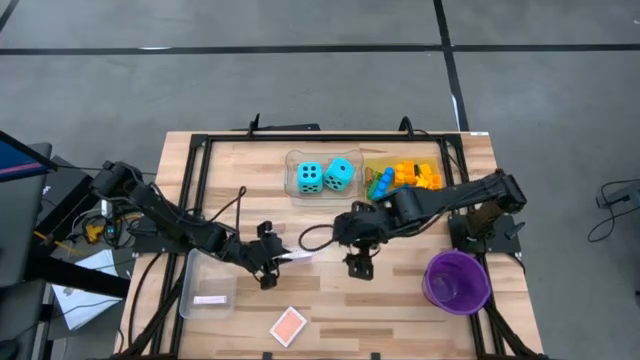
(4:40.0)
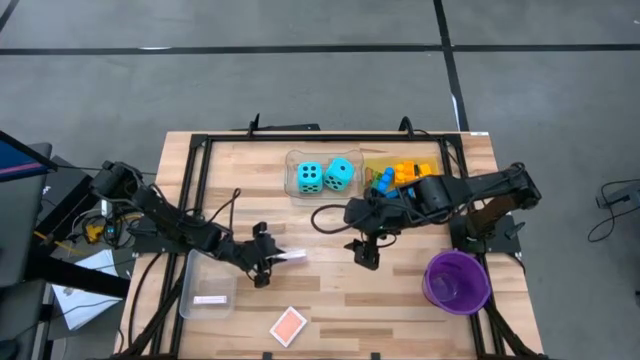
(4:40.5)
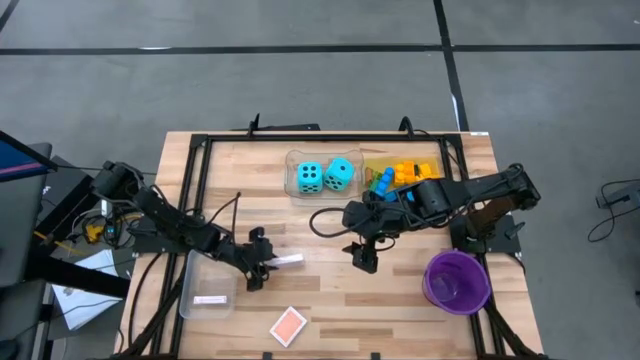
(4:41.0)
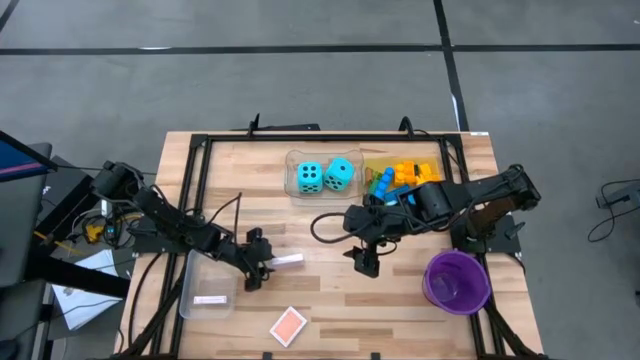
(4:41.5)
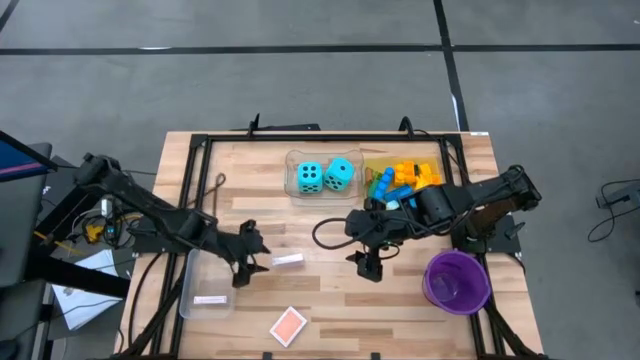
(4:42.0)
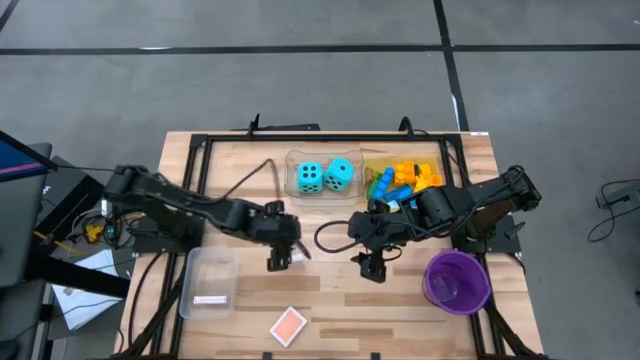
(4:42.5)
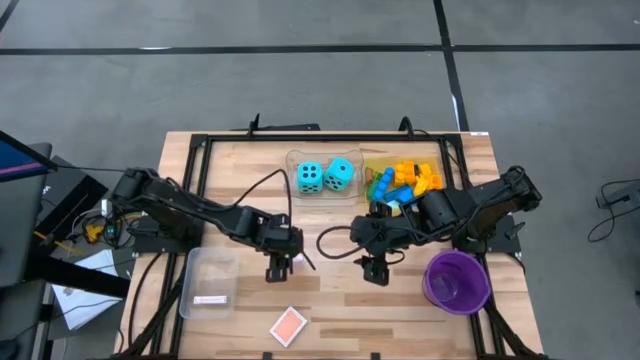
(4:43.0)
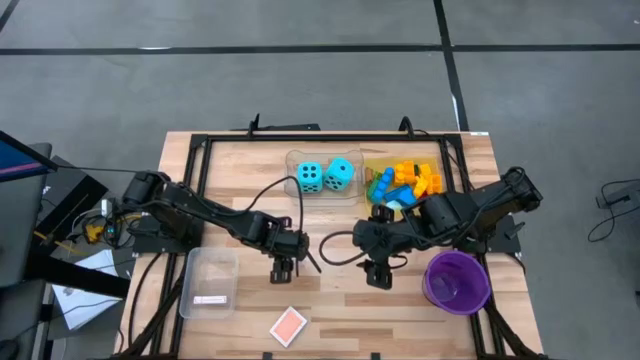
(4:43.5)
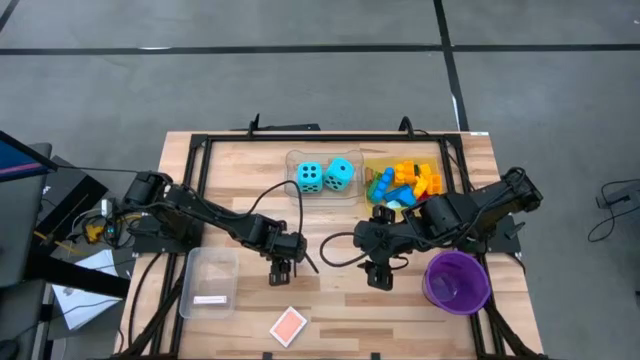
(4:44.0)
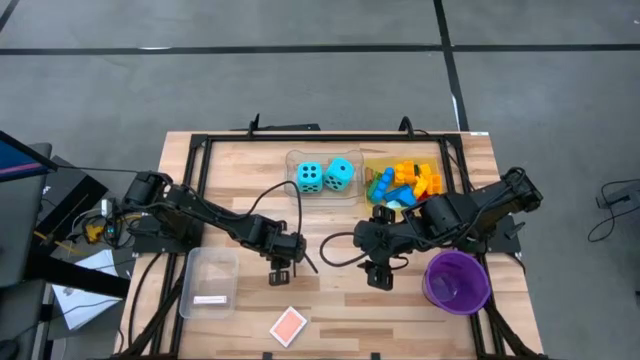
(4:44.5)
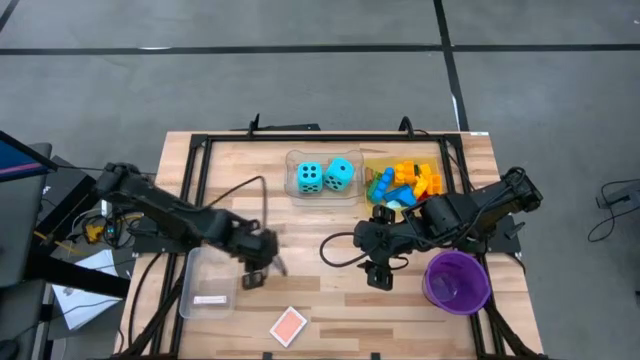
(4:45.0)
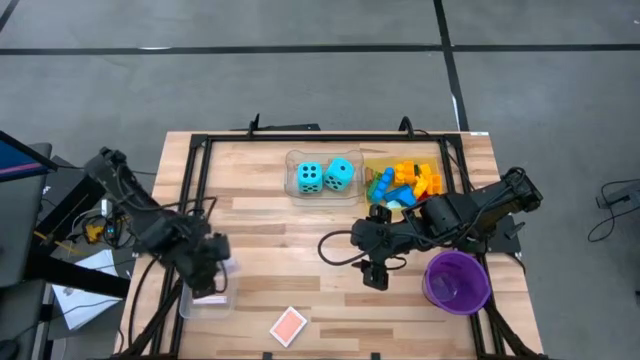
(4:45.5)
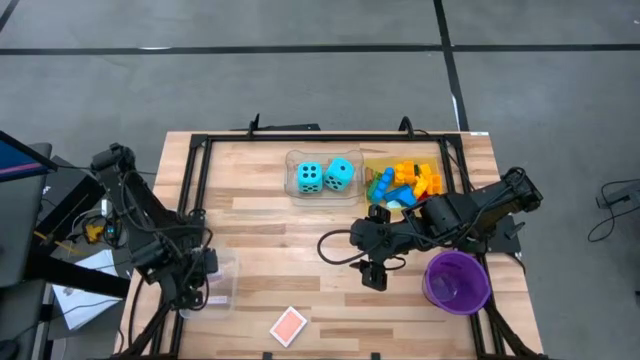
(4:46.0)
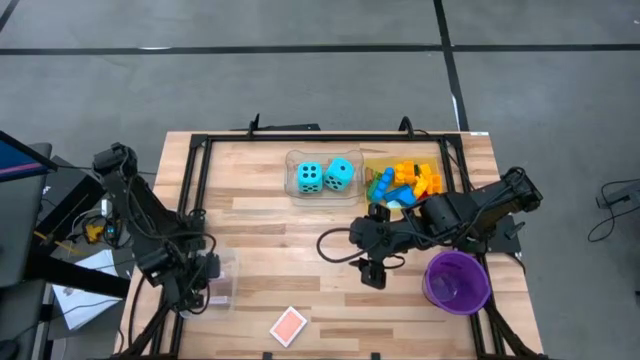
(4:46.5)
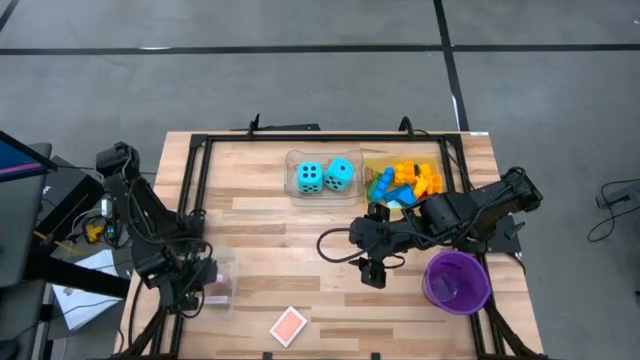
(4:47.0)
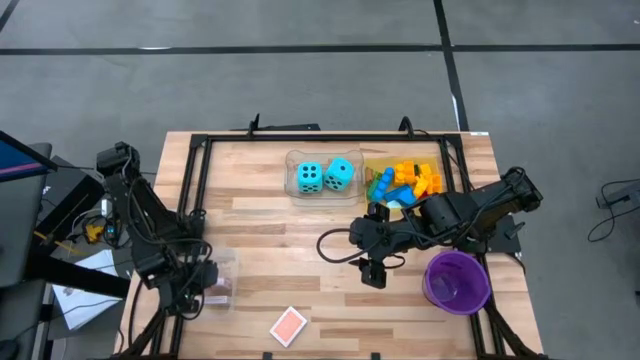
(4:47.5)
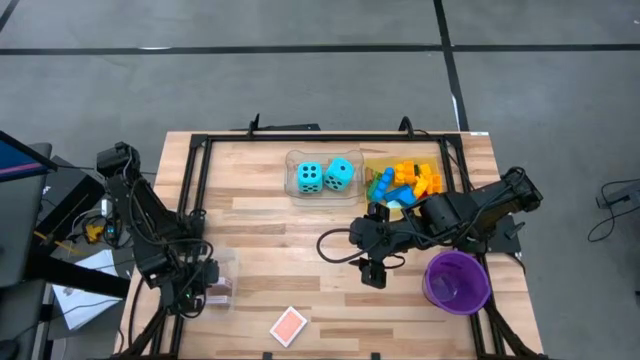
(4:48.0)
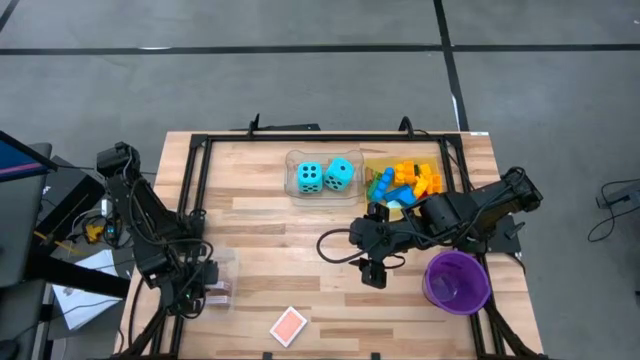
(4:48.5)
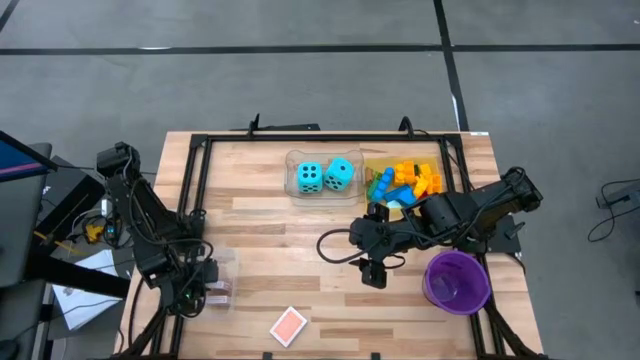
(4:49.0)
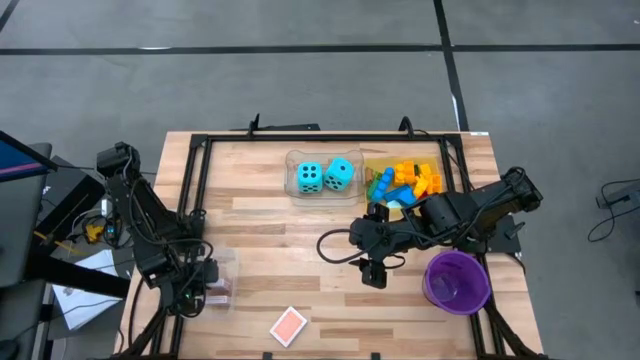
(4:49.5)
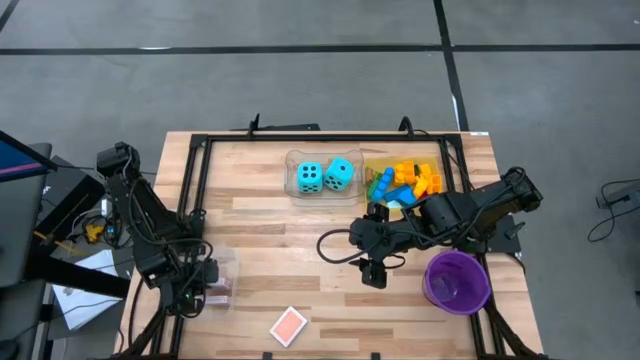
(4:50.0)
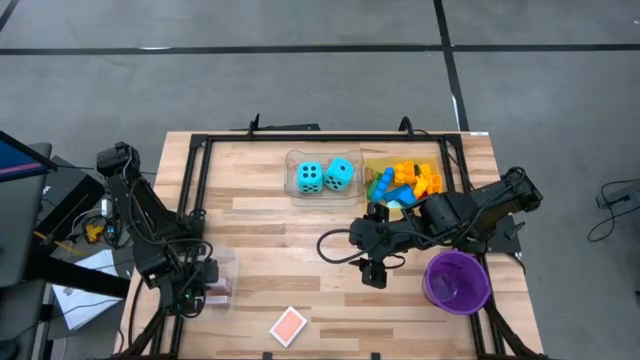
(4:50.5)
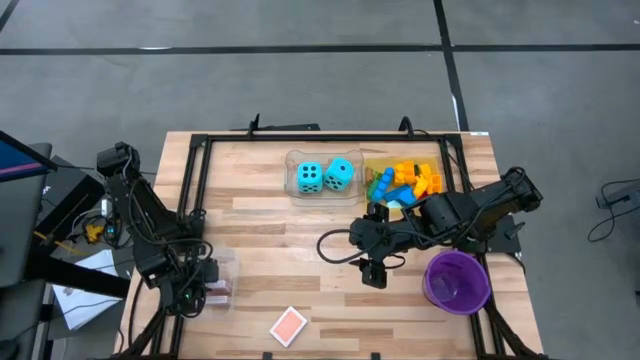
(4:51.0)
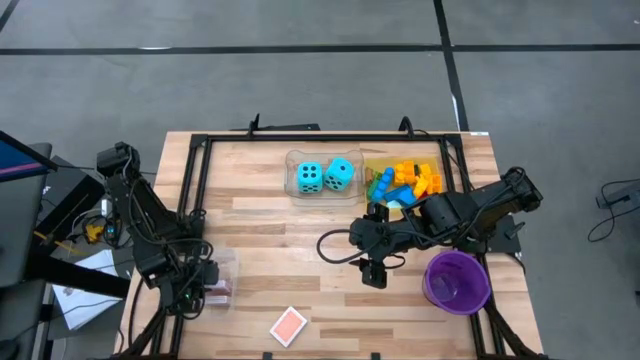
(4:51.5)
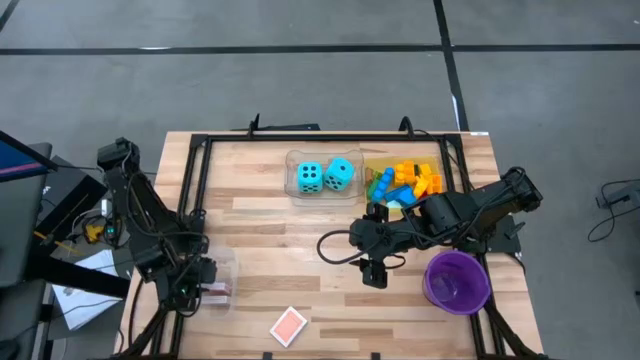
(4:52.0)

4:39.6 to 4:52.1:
Task: Pick & Place Toys
Put the pink deck of cards into the white transparent bin

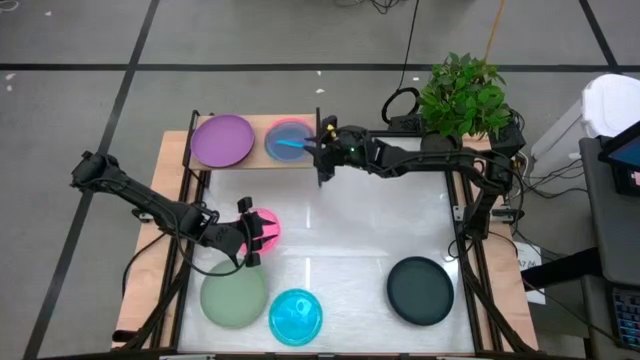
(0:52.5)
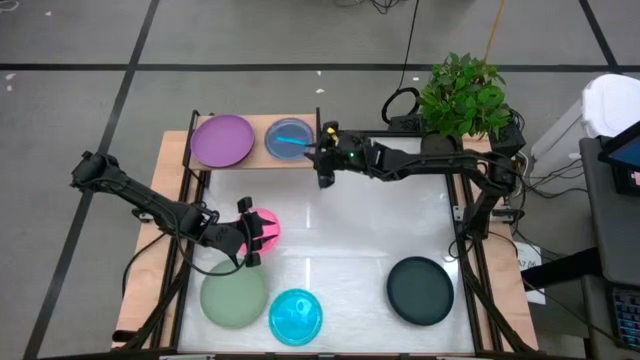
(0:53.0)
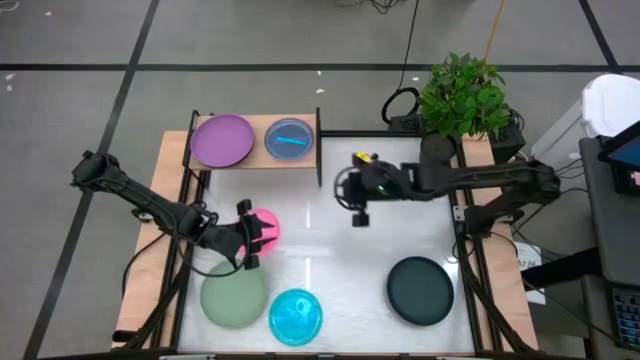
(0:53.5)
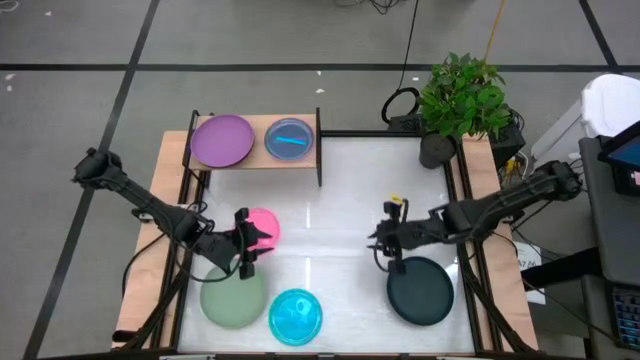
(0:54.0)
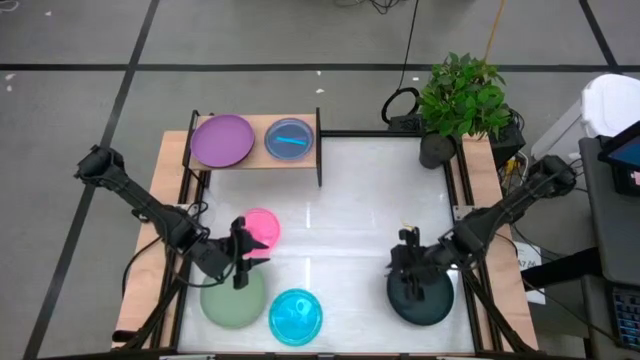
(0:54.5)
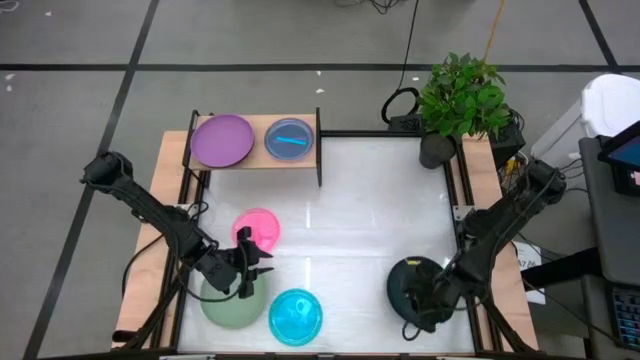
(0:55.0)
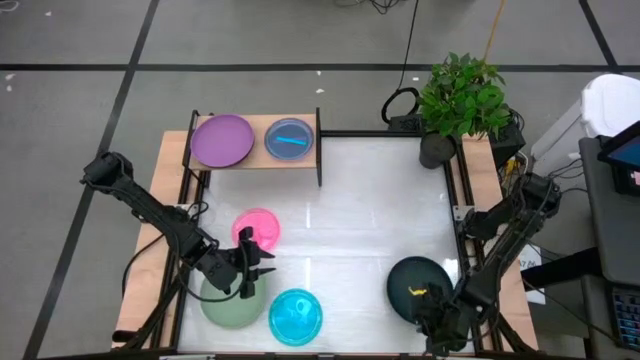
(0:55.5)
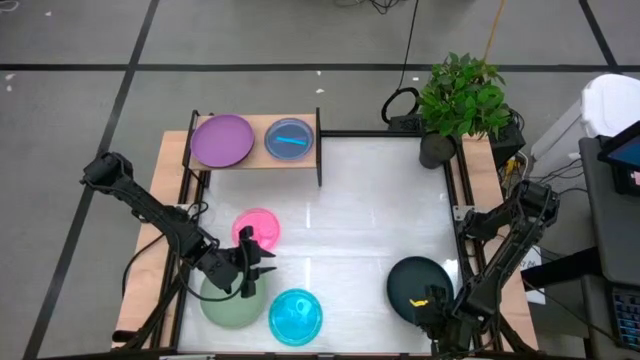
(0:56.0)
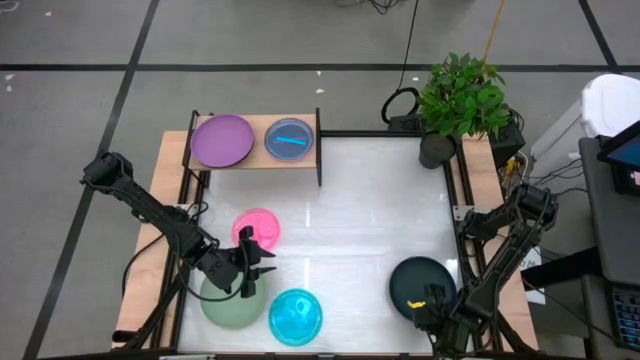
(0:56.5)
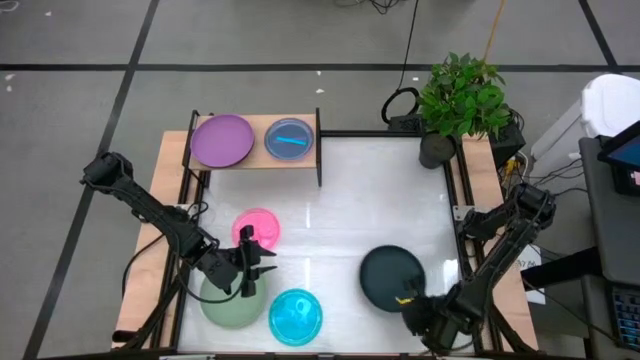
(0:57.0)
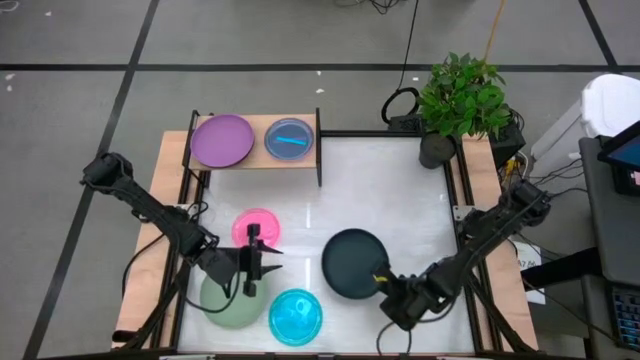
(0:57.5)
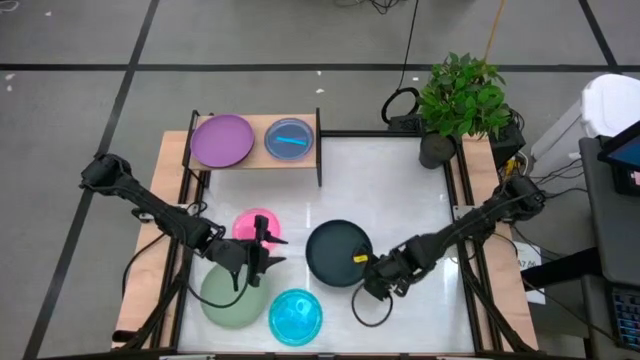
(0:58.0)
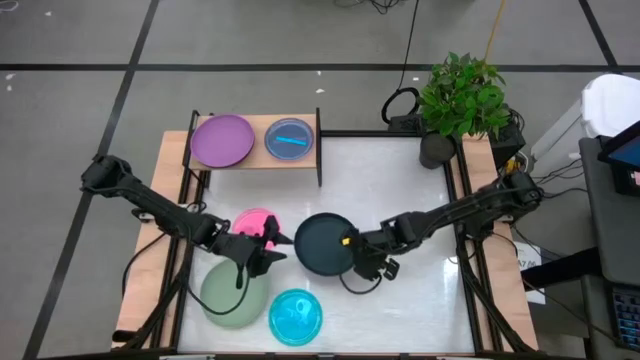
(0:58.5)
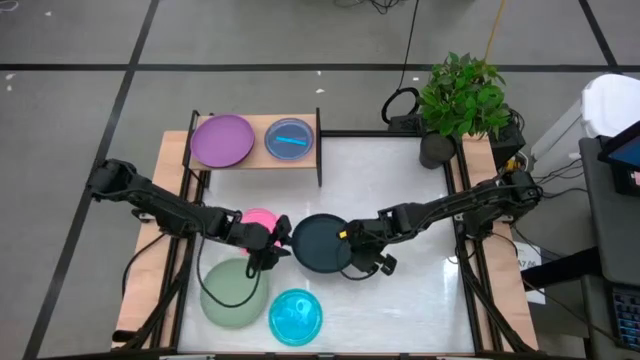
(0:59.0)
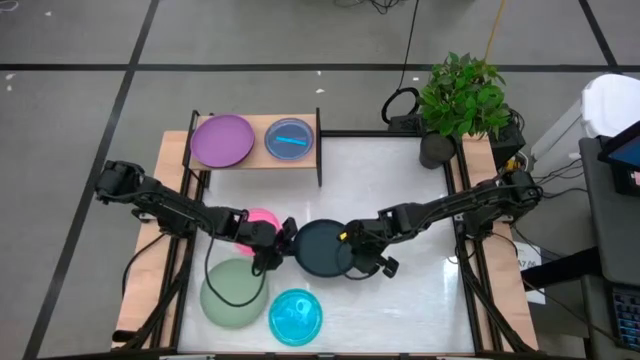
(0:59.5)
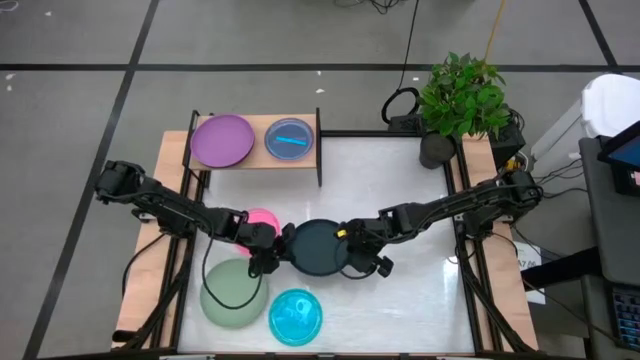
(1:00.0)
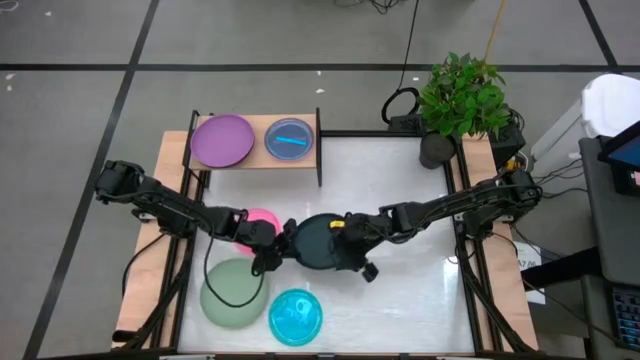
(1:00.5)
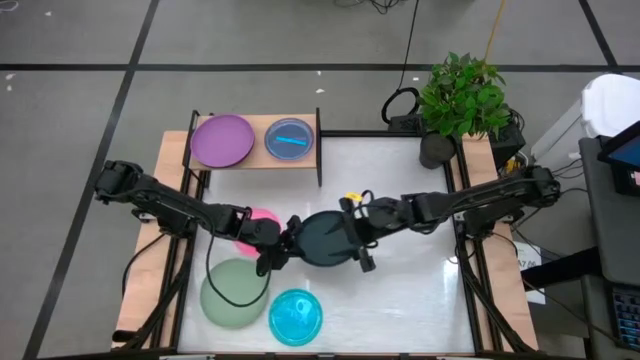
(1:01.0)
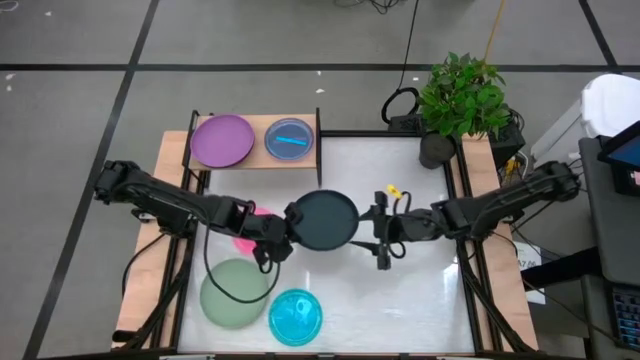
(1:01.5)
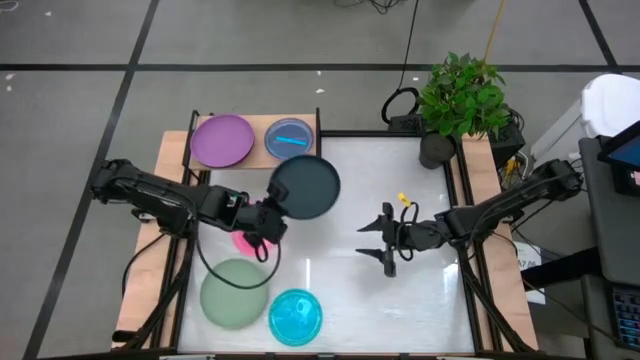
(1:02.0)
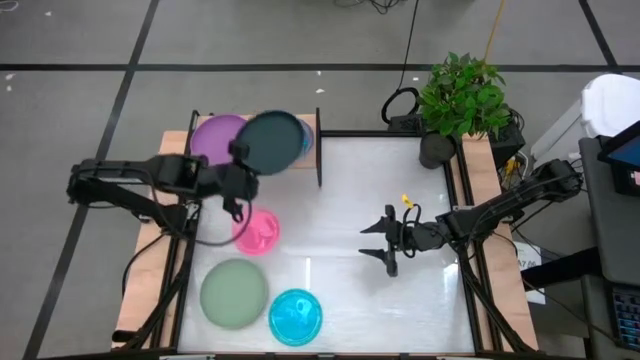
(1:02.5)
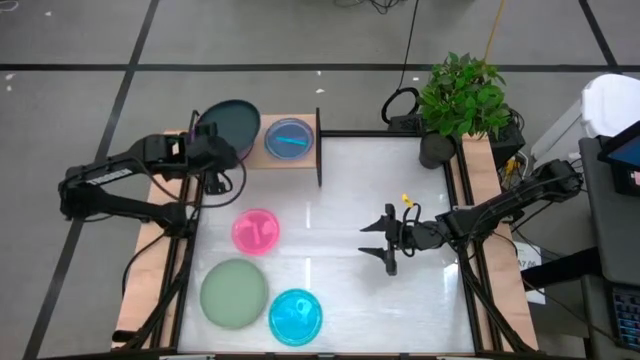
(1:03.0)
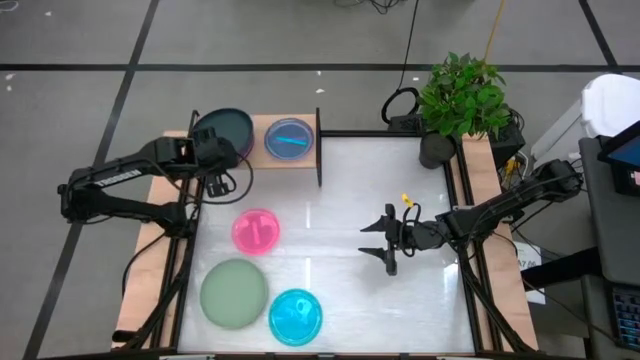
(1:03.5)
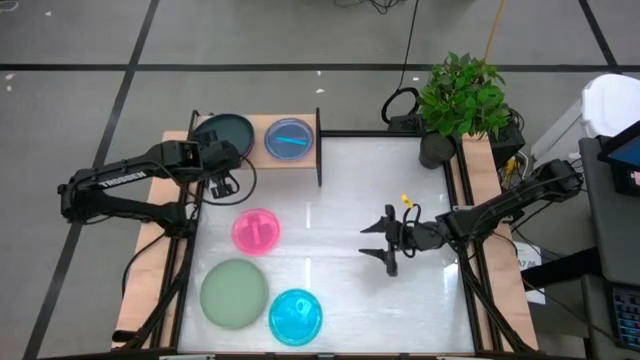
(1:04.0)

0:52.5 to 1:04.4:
Task: Place and stack plates onto a shelf
Stack the black plate on top of the purple plate on the shelf
